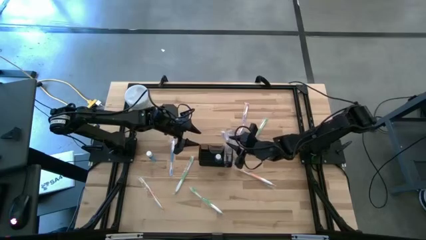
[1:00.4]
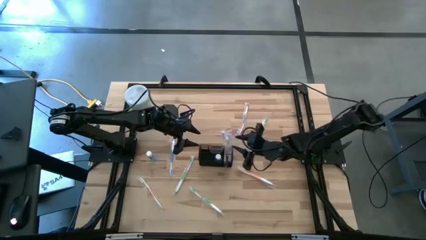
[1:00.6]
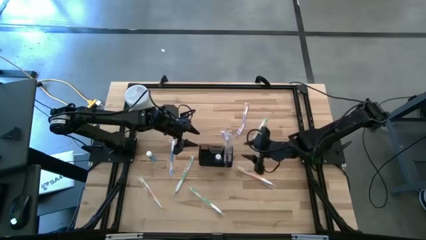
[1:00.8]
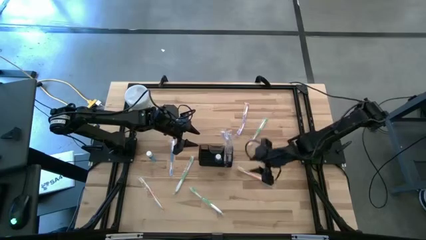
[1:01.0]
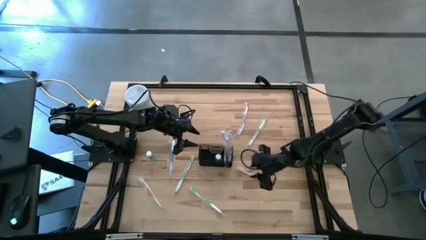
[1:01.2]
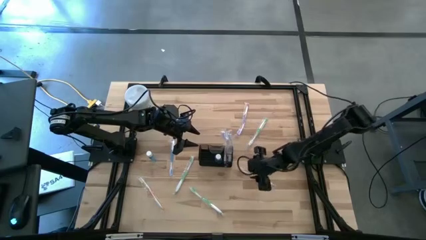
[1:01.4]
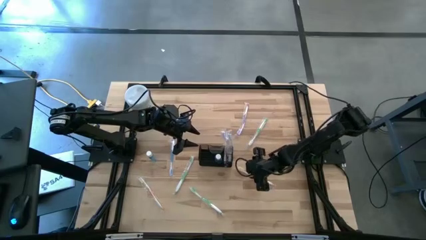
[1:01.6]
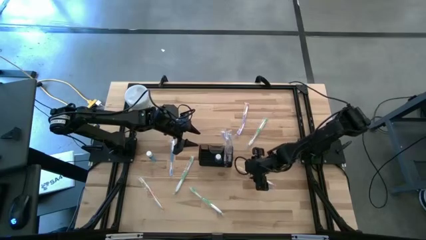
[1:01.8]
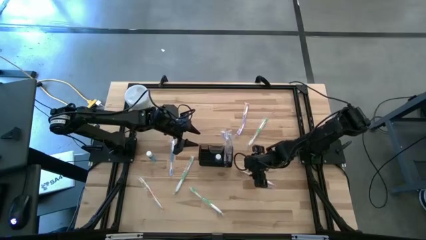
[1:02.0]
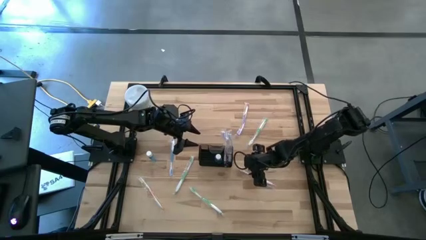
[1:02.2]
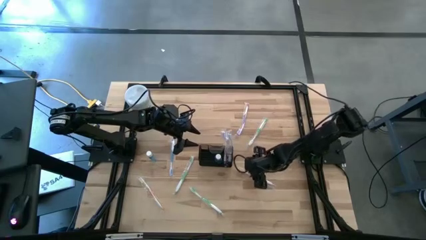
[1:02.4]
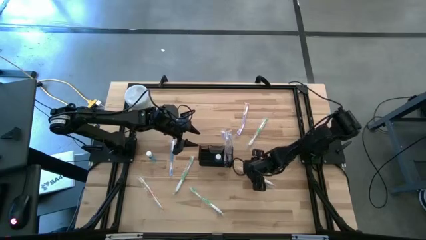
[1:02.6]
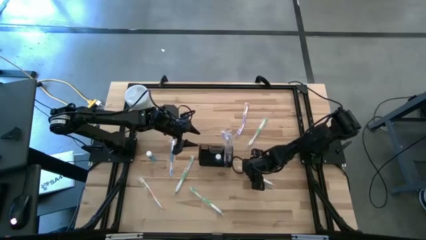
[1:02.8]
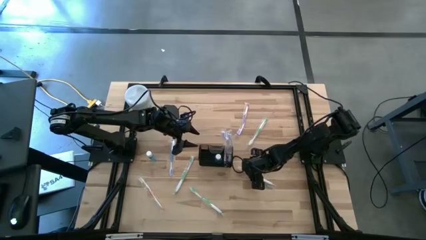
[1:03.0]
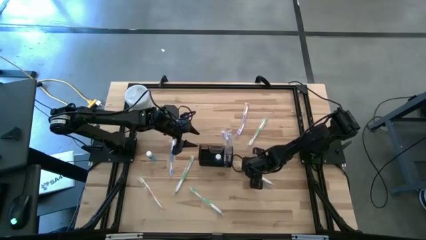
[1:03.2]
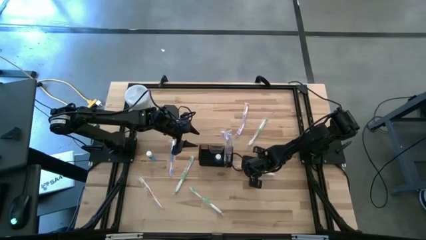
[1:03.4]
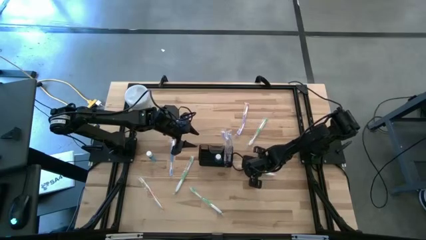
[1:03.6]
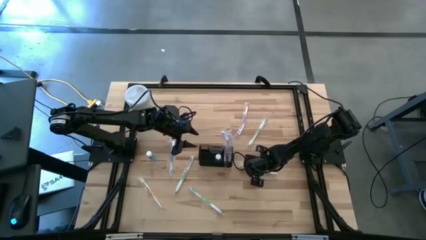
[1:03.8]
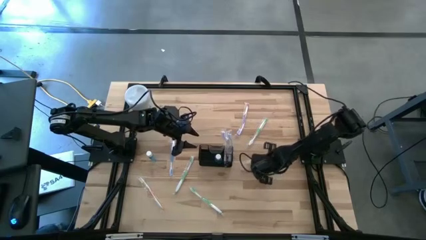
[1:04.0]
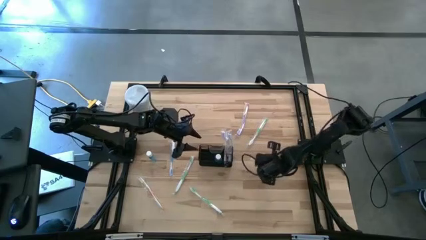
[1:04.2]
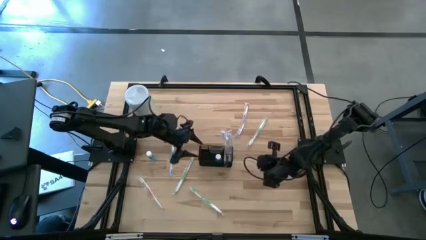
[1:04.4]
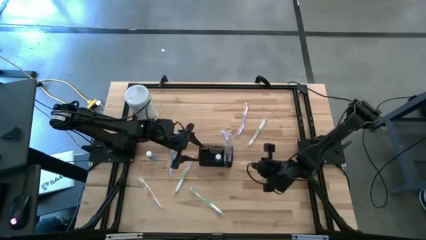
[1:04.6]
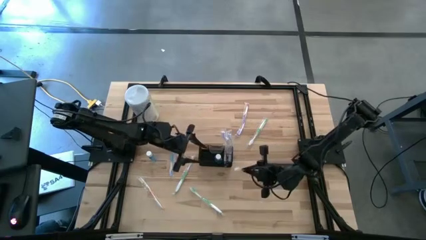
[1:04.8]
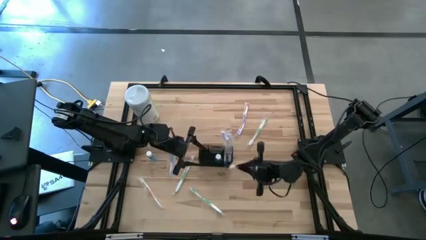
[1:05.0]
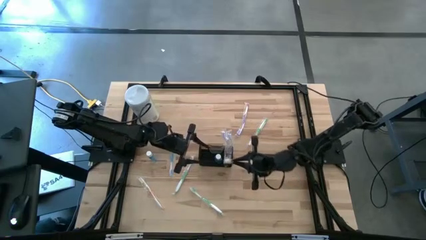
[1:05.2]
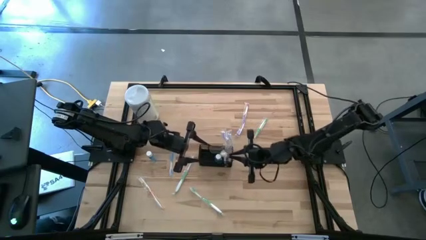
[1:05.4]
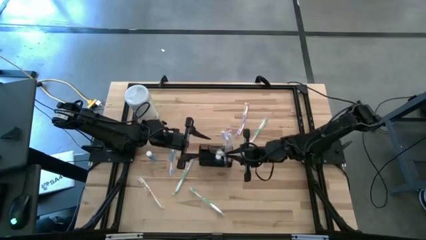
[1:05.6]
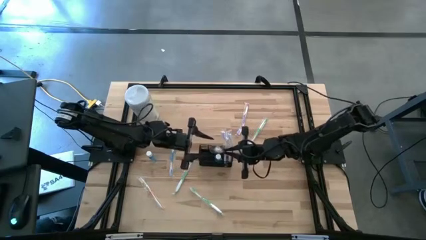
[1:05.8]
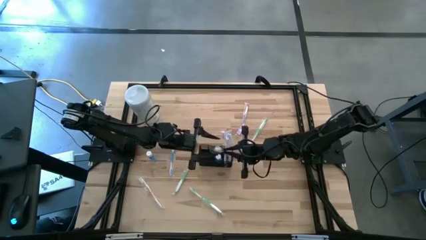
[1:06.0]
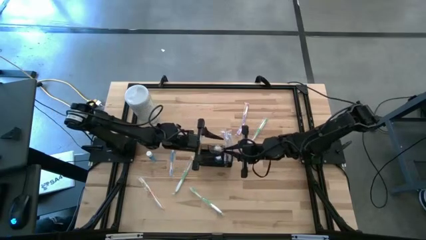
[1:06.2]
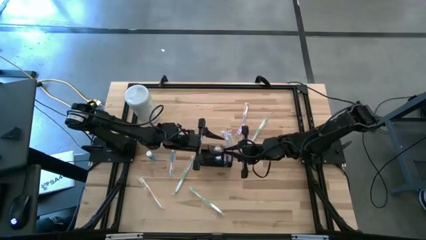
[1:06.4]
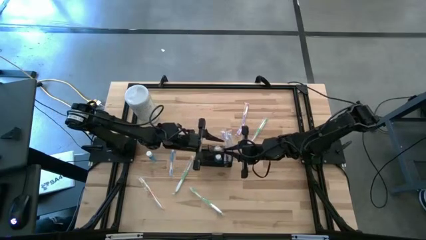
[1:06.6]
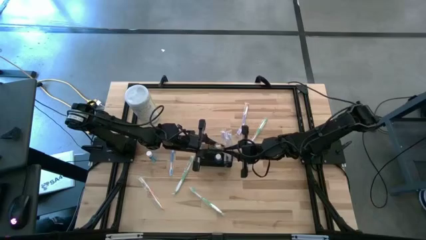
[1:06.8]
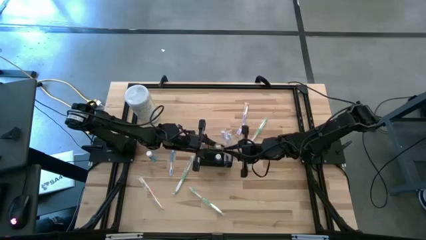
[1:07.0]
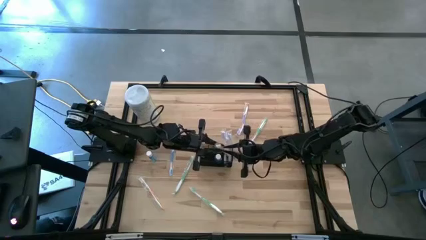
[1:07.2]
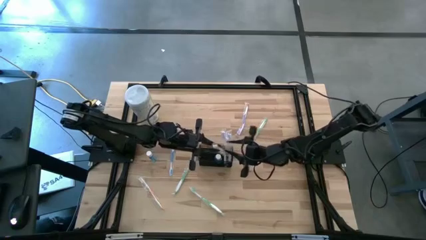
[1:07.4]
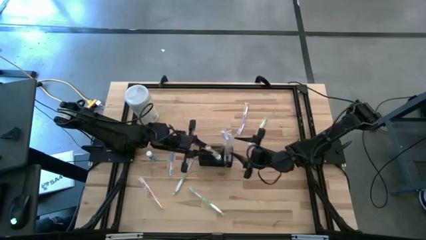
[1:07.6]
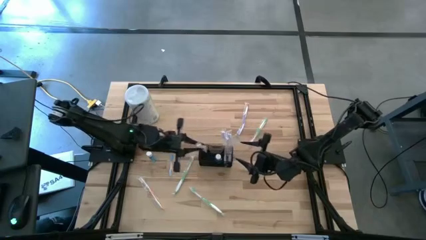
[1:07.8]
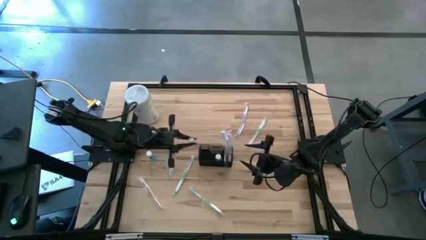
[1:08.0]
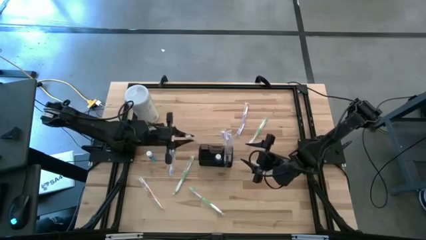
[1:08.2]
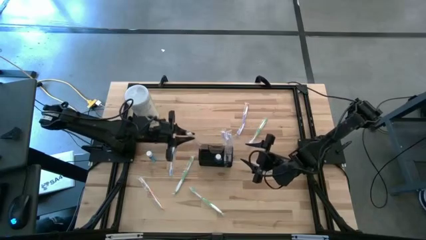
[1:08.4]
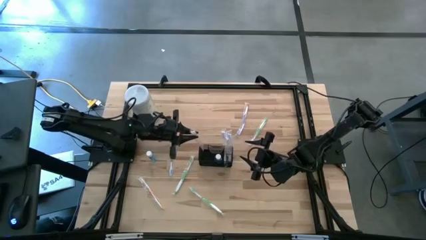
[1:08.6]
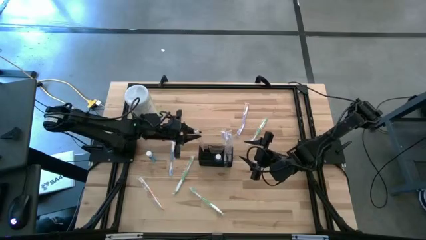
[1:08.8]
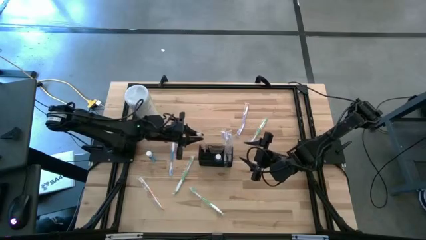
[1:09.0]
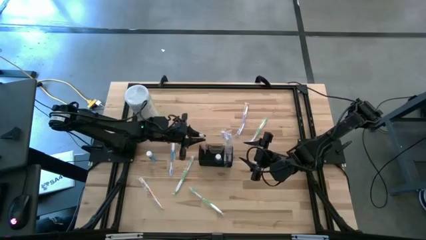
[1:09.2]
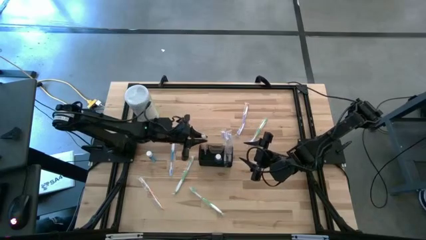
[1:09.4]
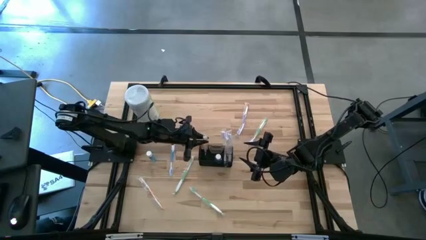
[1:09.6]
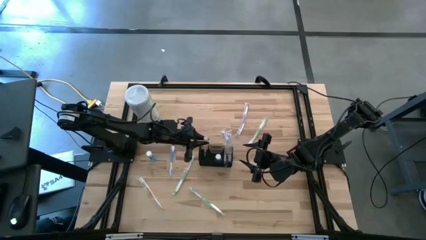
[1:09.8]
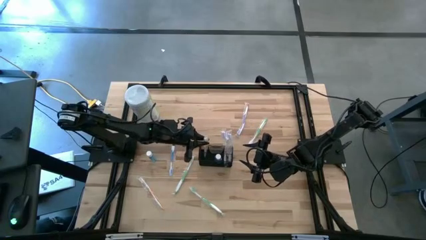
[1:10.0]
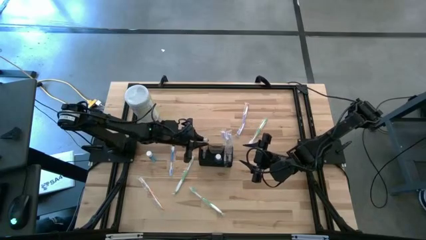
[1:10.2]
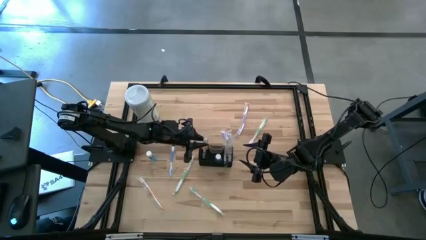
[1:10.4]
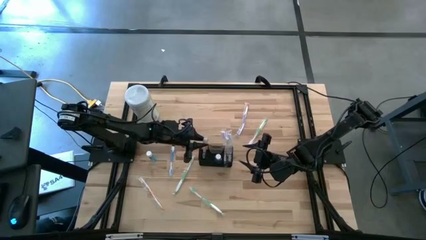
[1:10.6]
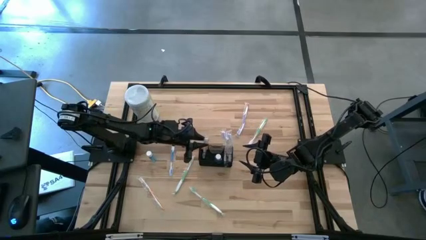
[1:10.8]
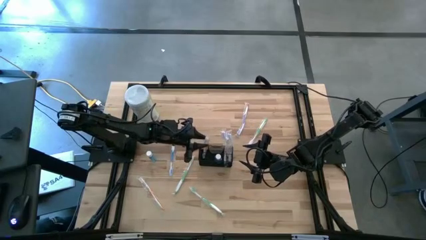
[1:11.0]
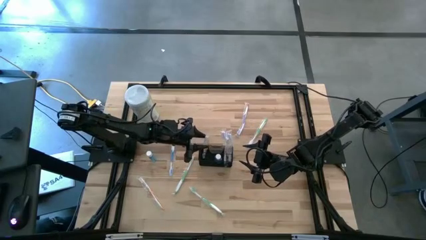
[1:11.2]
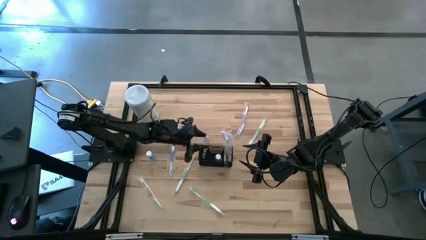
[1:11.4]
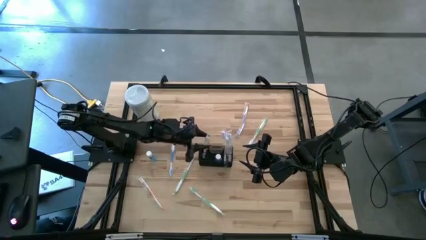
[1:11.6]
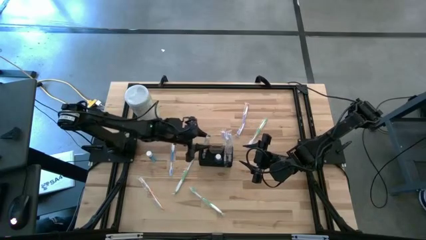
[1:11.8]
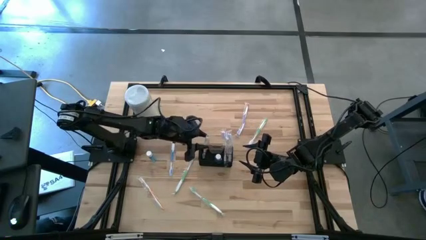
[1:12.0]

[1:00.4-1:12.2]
Task: Pick & Place toothbrushing station
Put the right orange toothbrush into the black mesh
